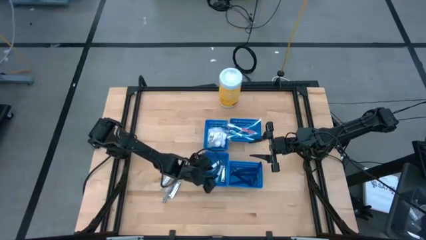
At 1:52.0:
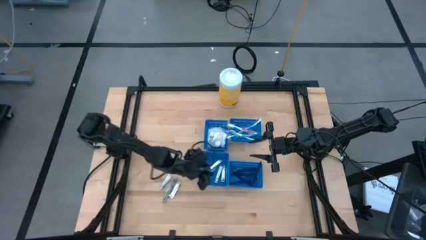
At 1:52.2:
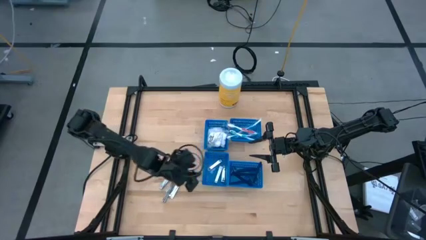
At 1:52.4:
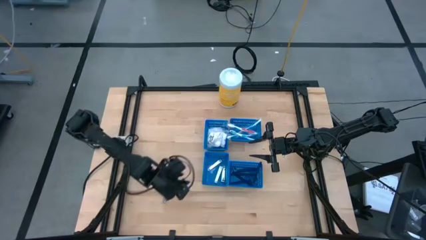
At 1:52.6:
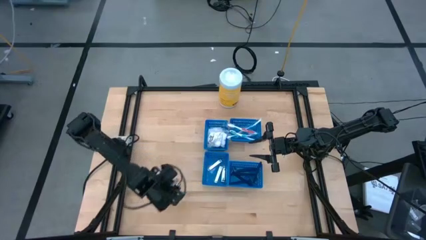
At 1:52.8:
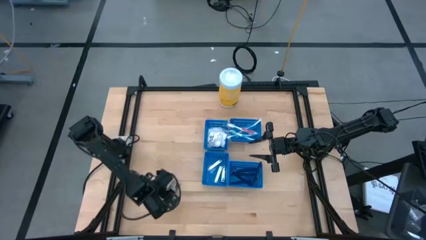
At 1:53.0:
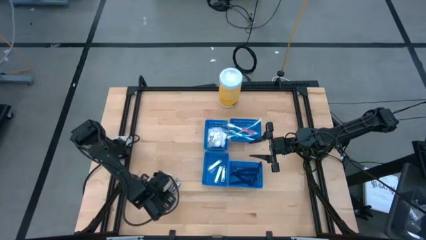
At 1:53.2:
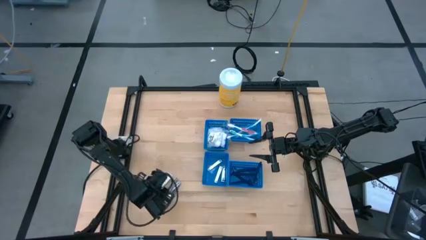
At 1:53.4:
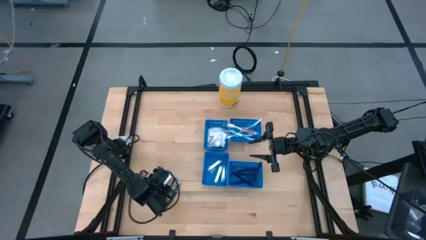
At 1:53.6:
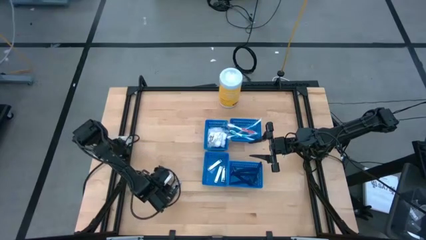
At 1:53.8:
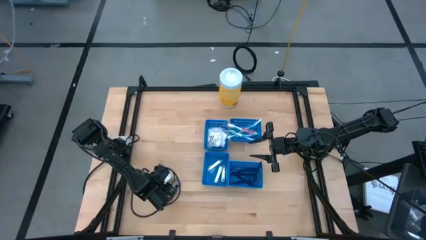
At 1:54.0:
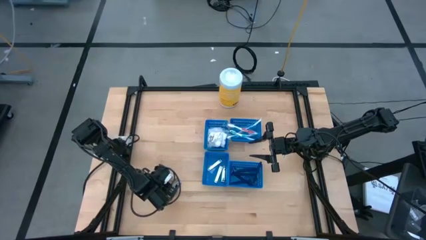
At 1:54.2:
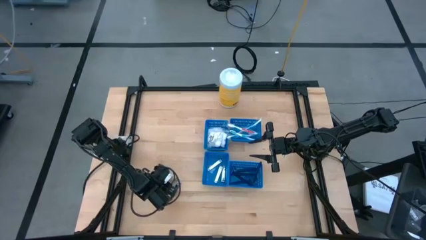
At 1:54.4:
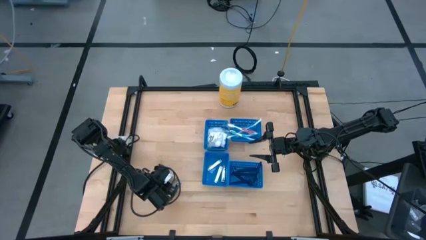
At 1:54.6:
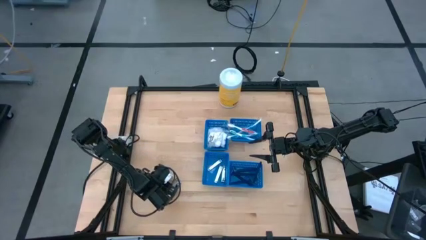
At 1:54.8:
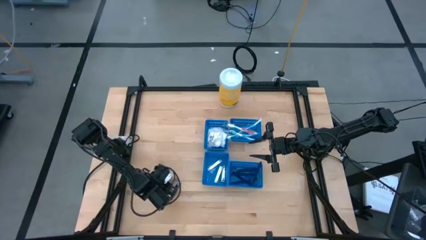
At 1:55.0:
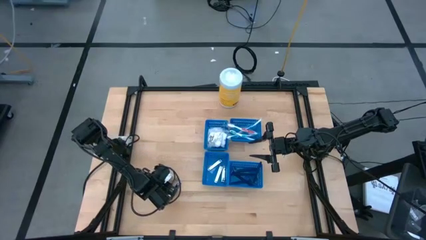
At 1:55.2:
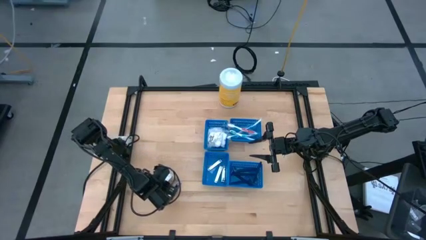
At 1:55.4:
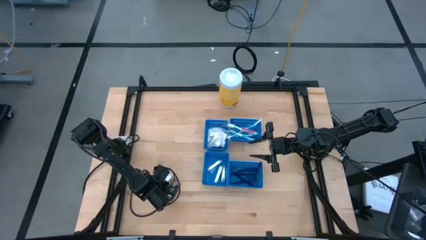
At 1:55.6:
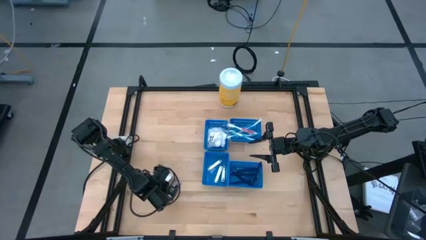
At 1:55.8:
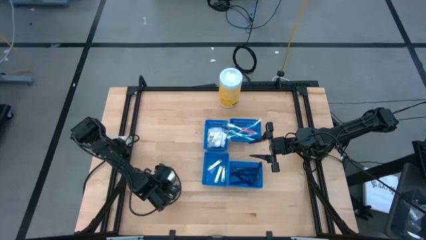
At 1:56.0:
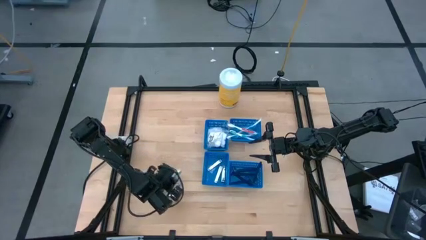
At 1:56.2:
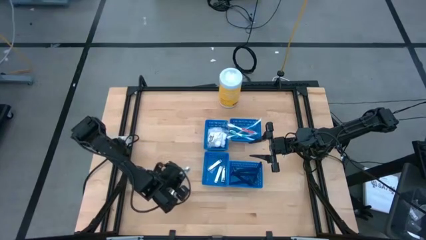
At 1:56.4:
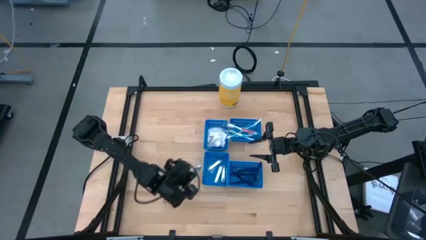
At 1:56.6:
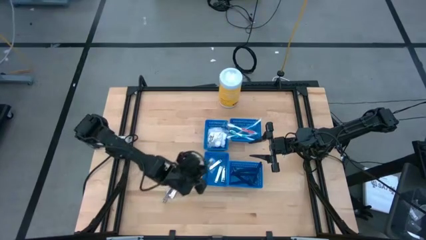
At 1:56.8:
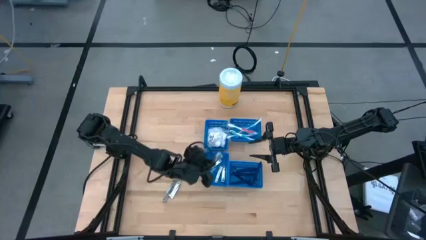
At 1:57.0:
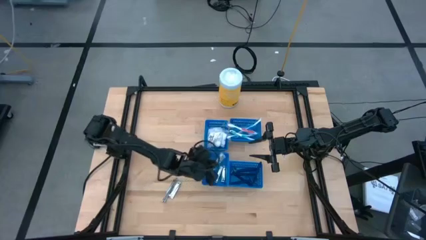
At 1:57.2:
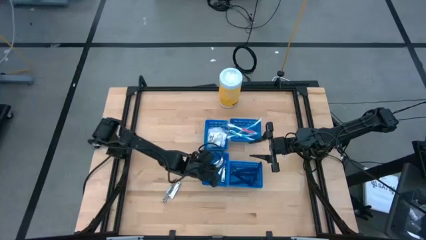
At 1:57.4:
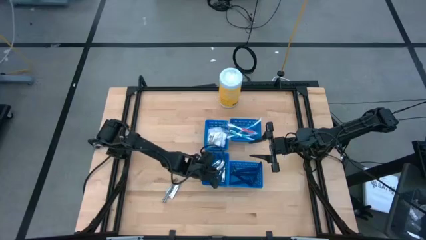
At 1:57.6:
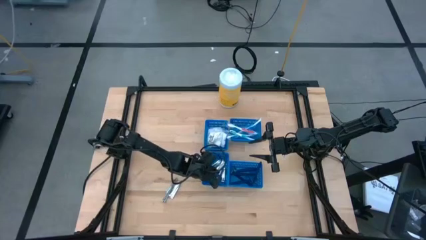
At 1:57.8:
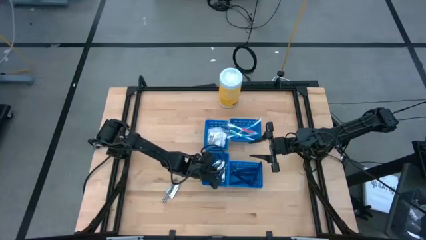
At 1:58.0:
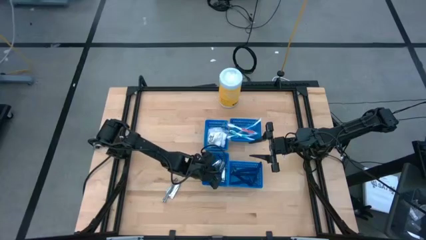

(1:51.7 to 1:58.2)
Task: Pick & Place Travel size toiletries
Put the silver nail cutter into the bottom left blue bin

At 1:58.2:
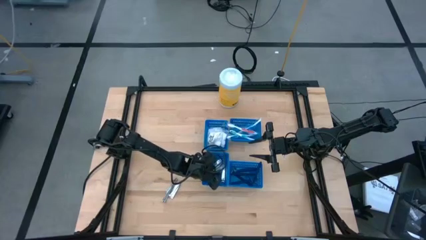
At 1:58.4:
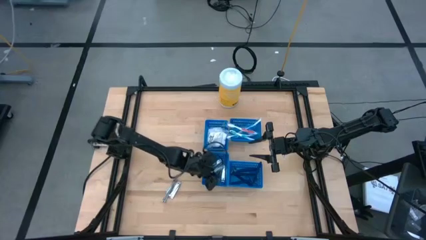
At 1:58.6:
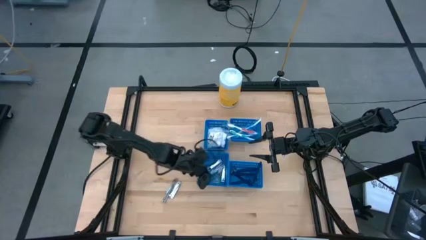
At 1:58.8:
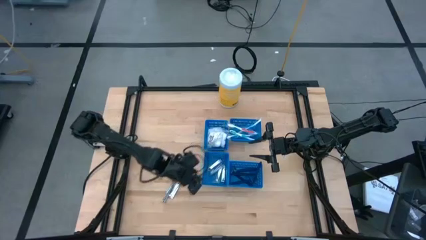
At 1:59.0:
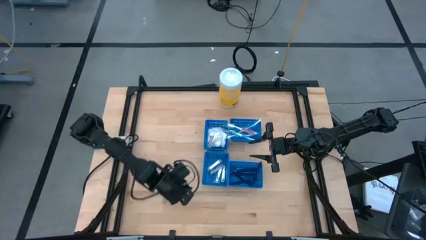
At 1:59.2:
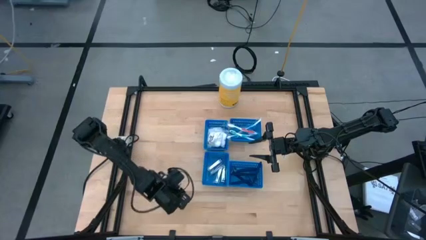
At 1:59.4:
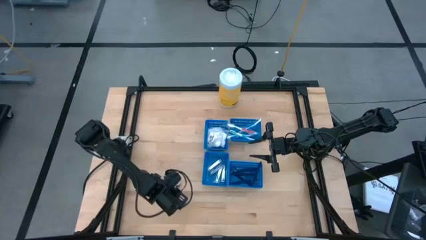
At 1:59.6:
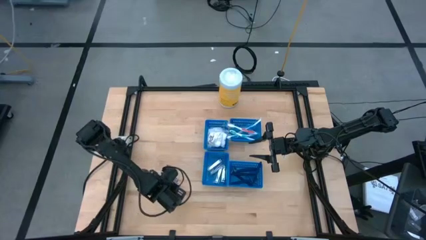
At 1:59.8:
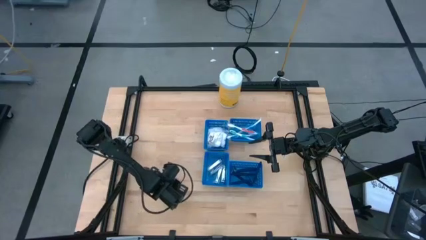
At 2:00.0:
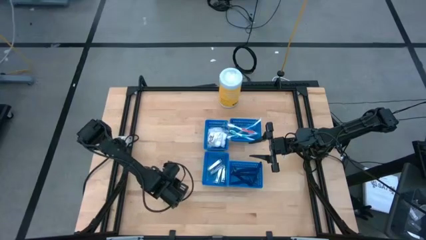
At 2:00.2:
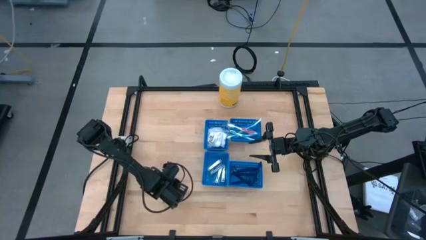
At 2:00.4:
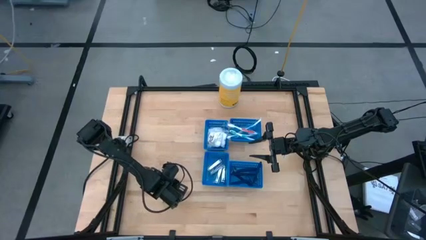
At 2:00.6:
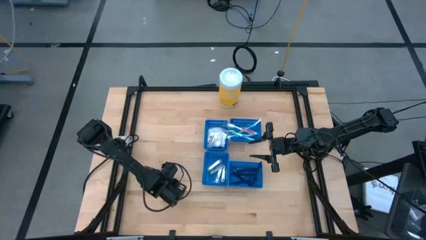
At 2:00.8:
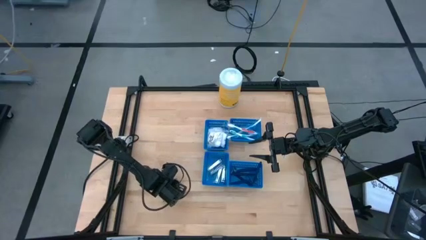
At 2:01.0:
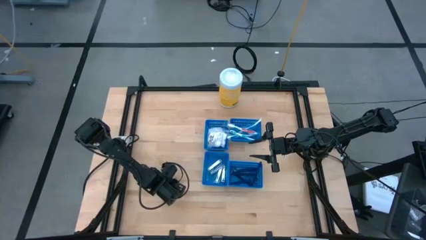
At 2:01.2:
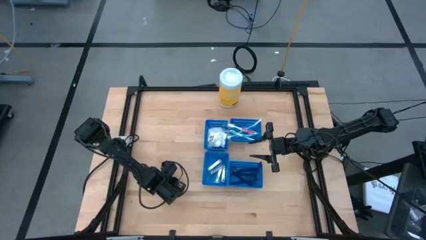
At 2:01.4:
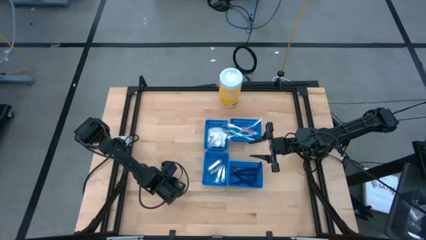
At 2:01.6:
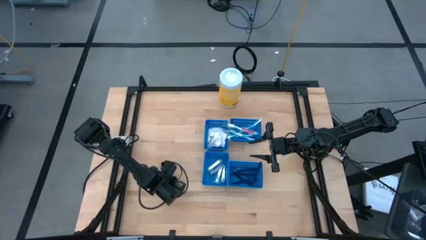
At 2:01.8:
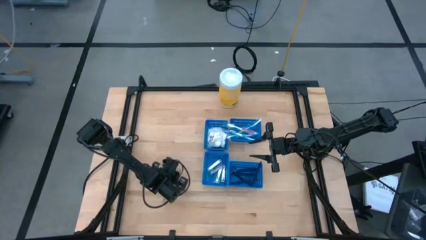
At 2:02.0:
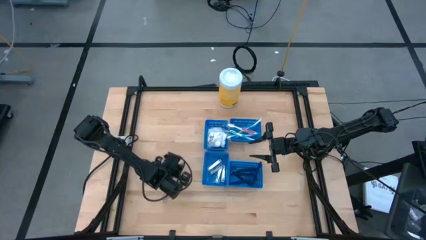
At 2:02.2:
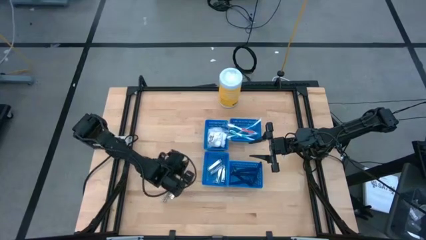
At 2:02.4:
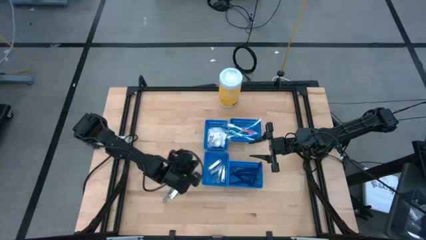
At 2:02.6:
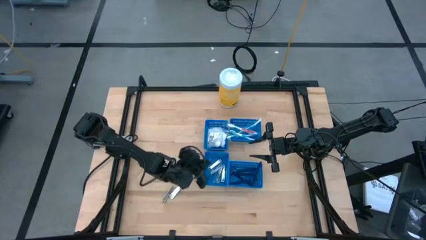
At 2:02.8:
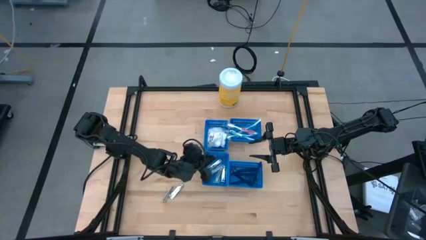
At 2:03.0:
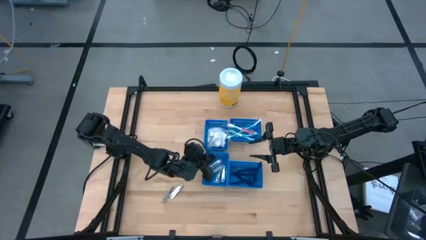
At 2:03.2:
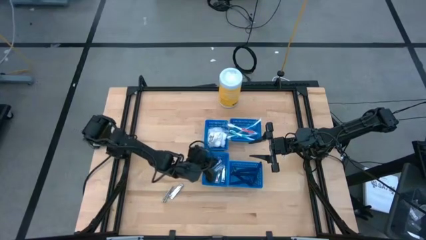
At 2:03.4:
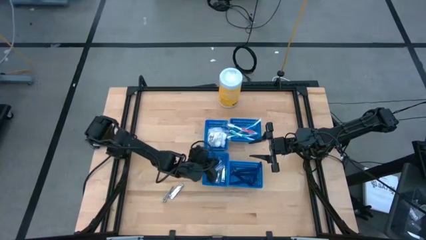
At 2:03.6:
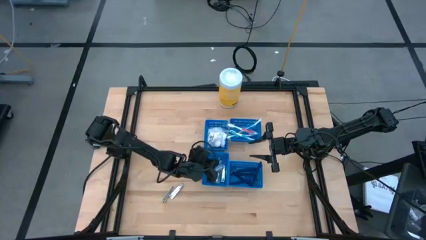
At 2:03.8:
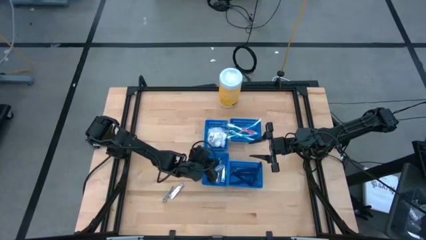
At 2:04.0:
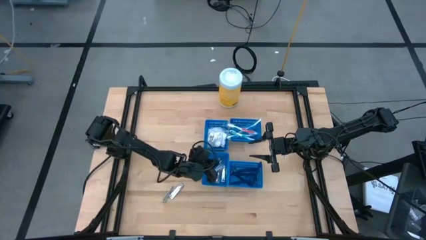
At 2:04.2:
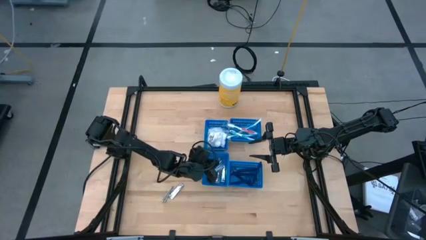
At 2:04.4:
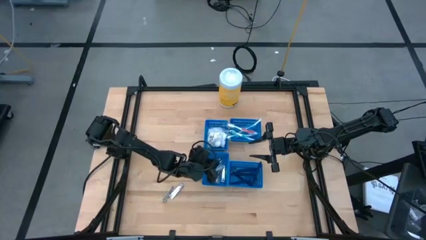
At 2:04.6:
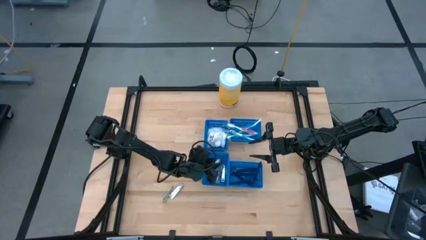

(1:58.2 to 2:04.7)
Put the silver nail cutter into the bottom left blue bin

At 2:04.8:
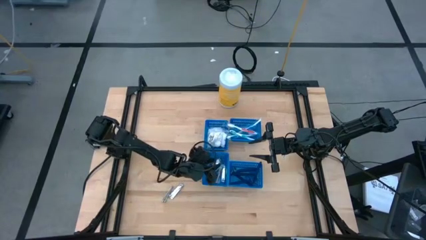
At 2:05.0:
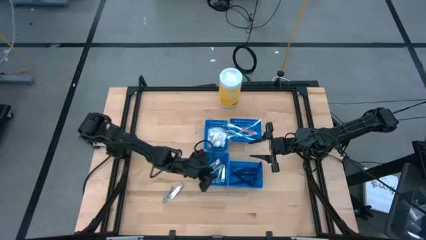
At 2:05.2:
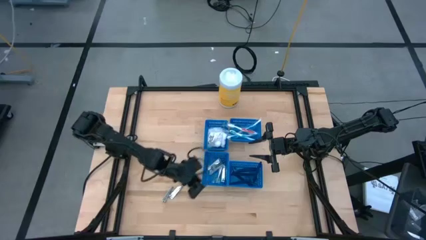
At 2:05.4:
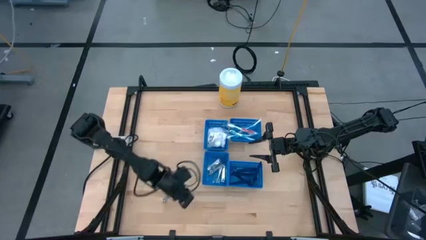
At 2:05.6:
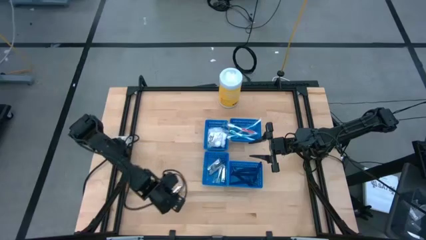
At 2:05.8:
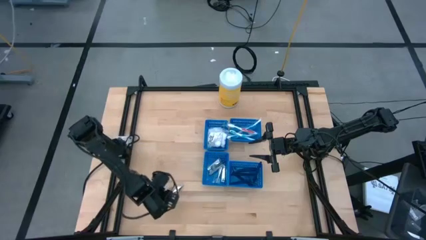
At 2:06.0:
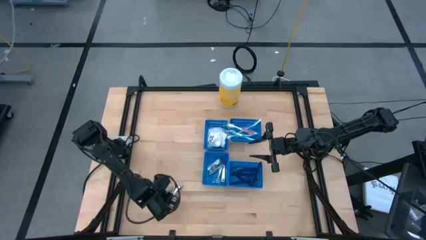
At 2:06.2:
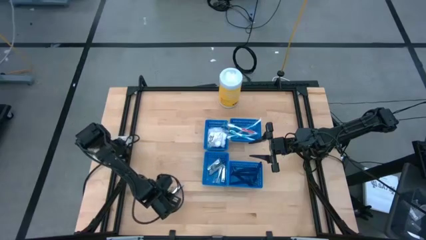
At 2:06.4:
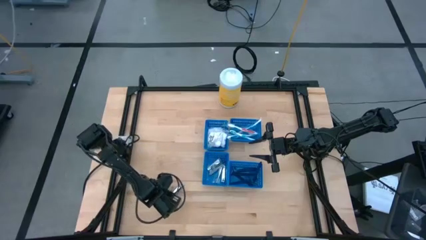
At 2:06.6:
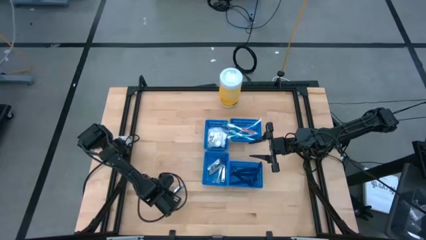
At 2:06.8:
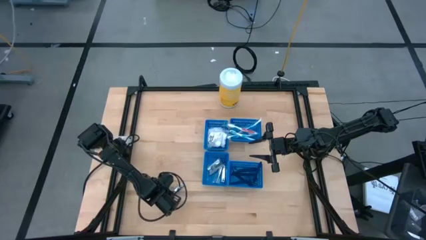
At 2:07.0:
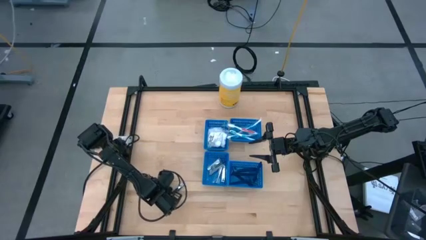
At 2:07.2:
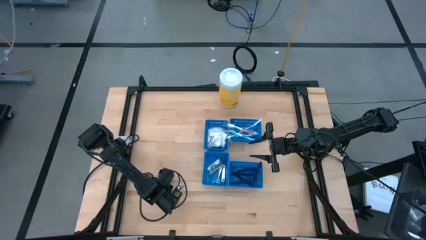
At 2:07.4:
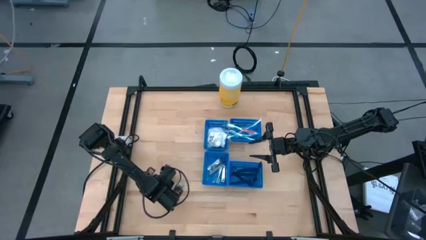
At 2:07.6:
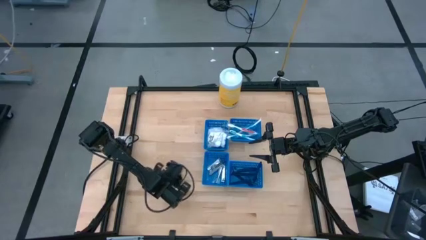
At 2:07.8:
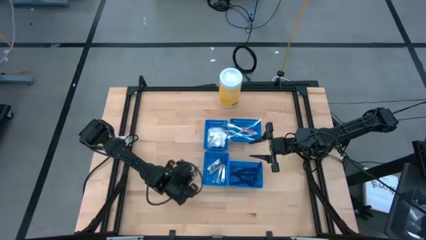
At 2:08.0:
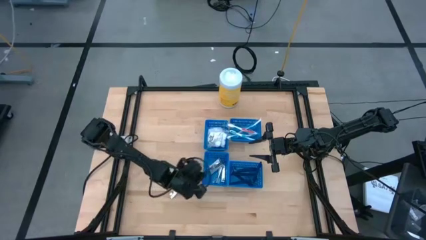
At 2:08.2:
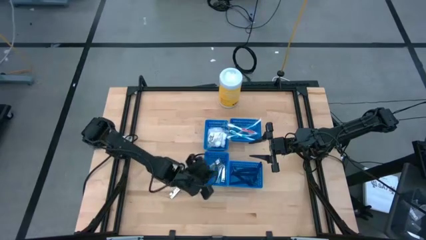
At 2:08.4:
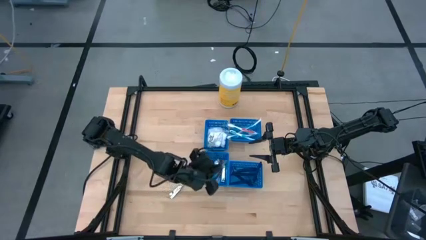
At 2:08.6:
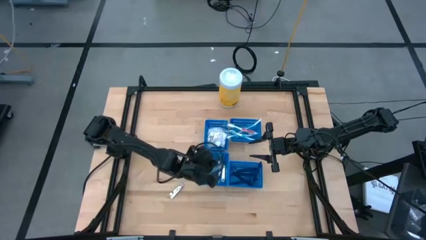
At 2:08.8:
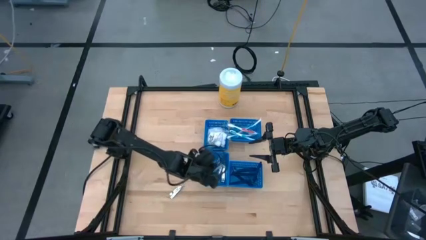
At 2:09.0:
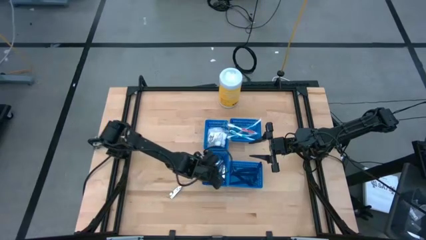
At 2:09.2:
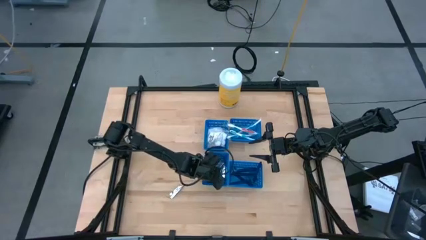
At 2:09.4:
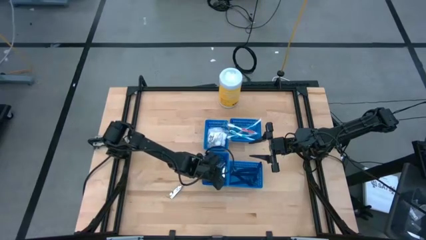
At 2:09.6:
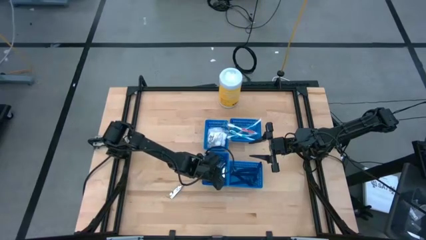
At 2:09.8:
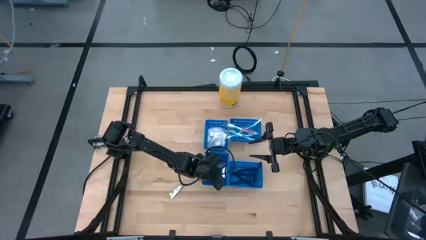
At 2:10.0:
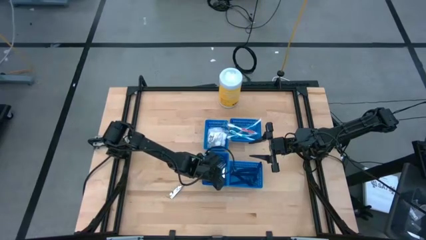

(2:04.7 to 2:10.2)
Put the silver nail cutter into the bottom left blue bin
